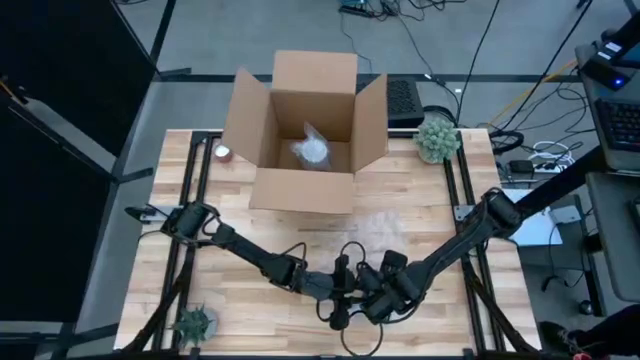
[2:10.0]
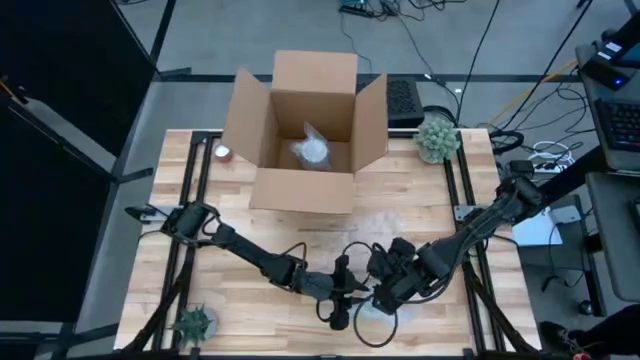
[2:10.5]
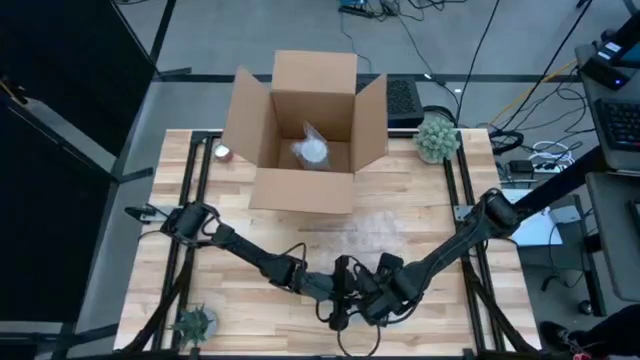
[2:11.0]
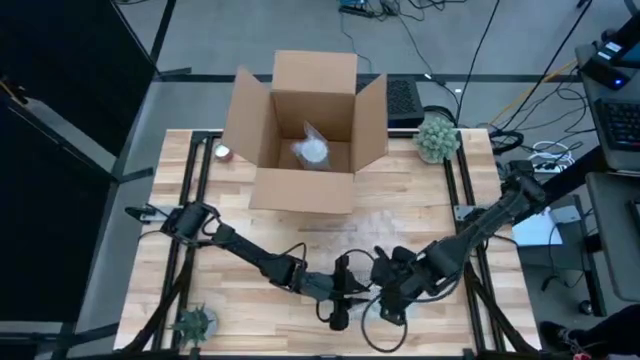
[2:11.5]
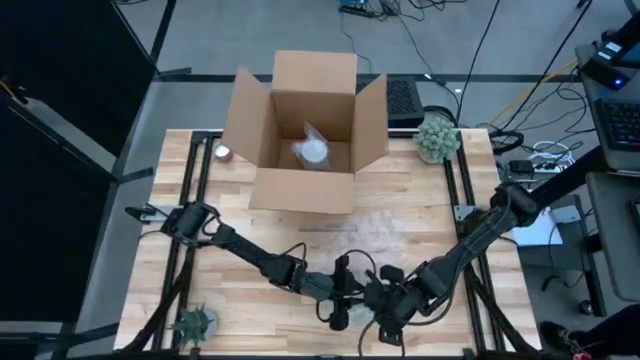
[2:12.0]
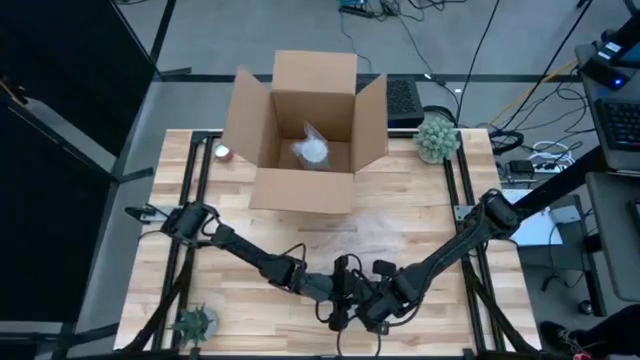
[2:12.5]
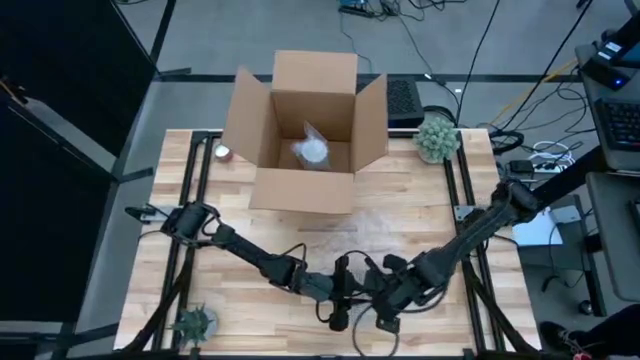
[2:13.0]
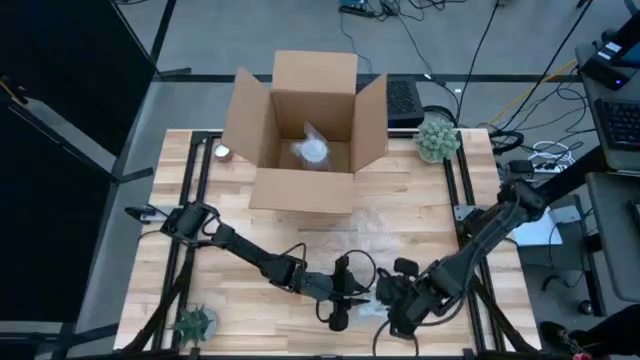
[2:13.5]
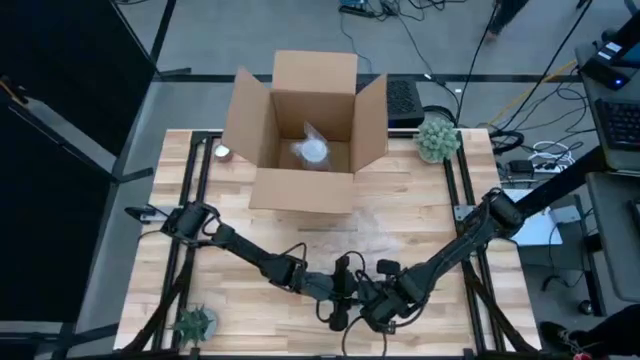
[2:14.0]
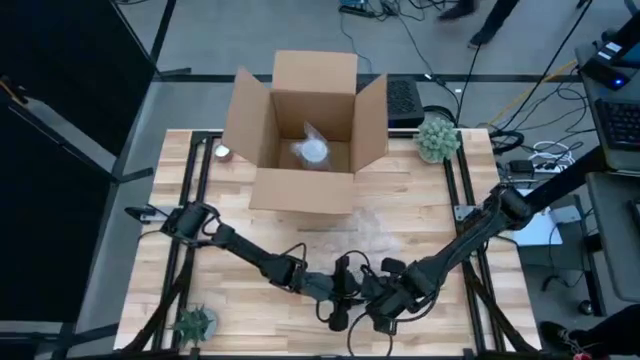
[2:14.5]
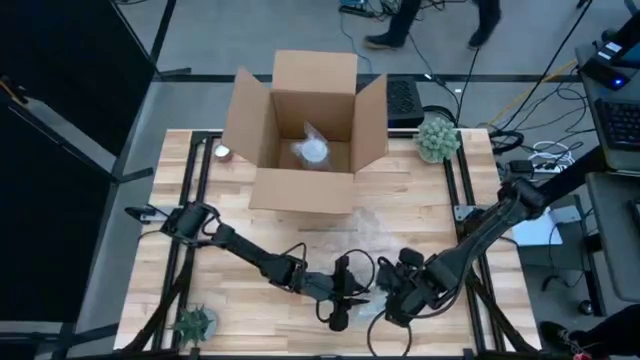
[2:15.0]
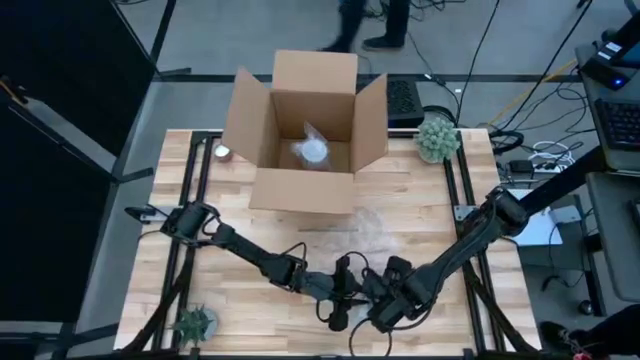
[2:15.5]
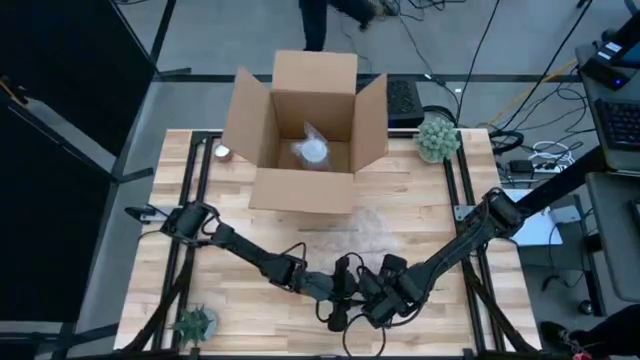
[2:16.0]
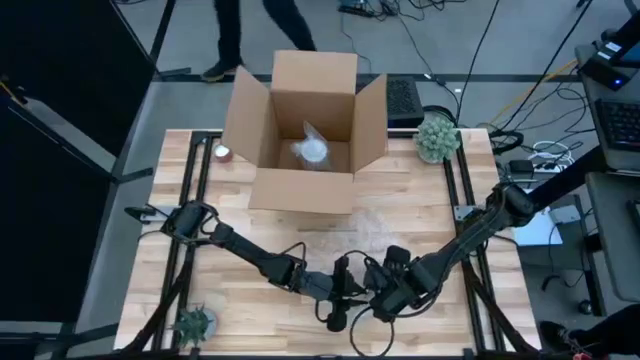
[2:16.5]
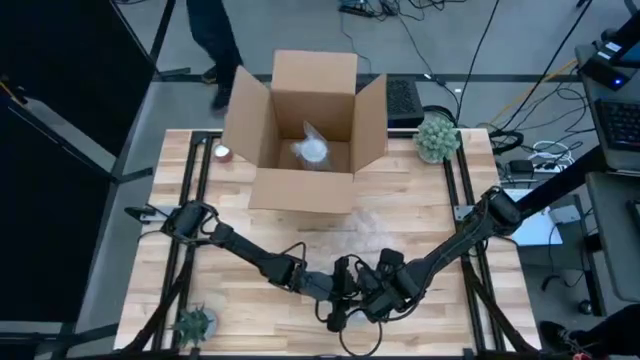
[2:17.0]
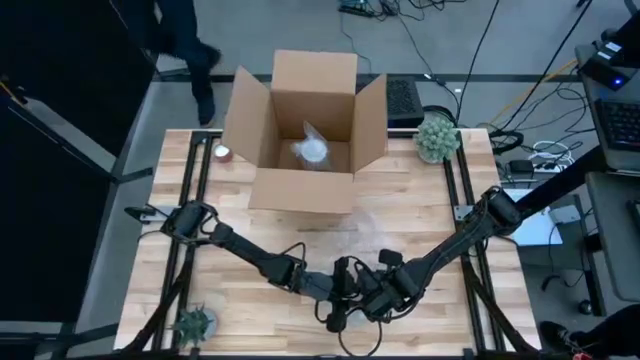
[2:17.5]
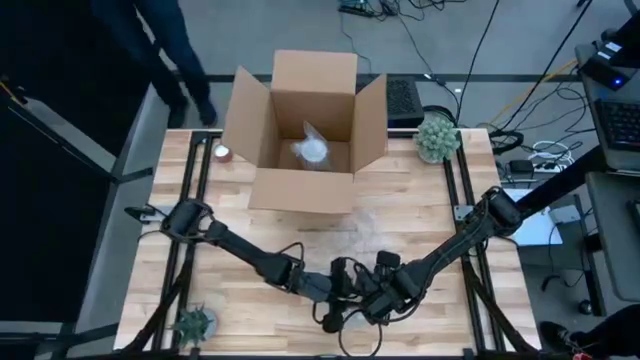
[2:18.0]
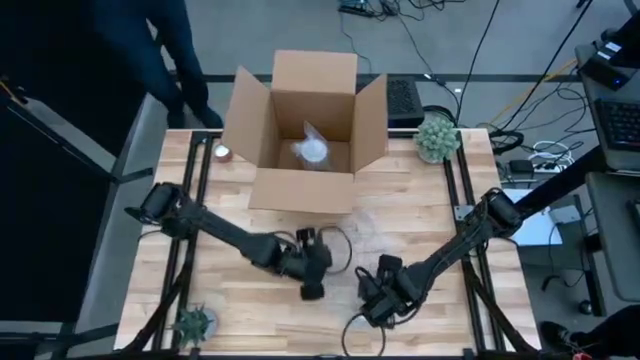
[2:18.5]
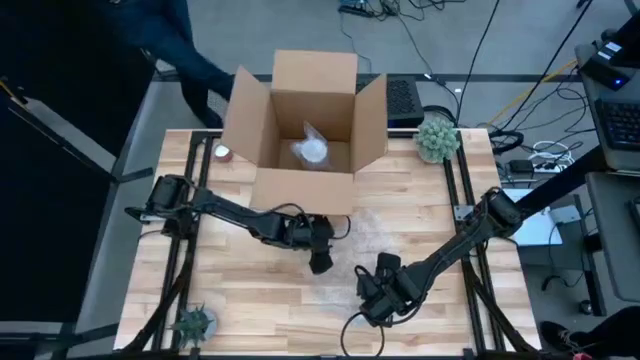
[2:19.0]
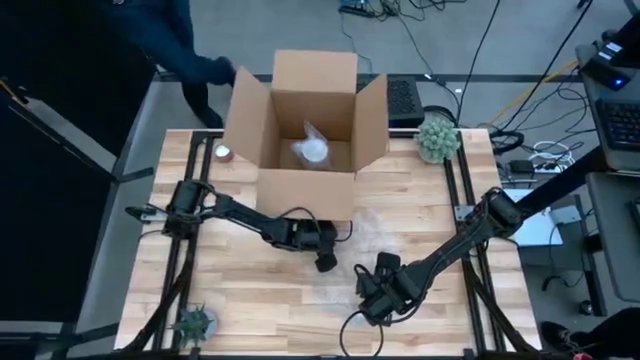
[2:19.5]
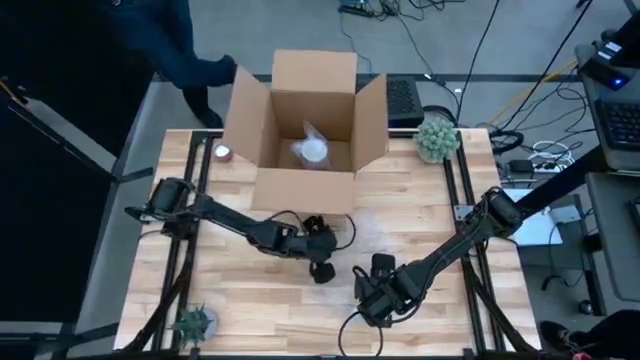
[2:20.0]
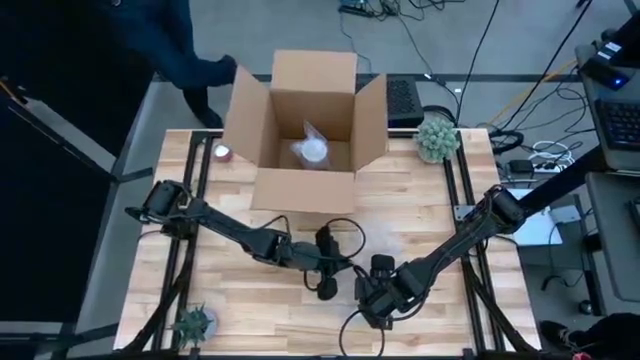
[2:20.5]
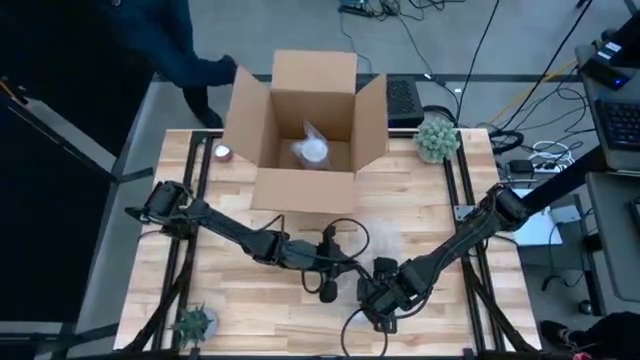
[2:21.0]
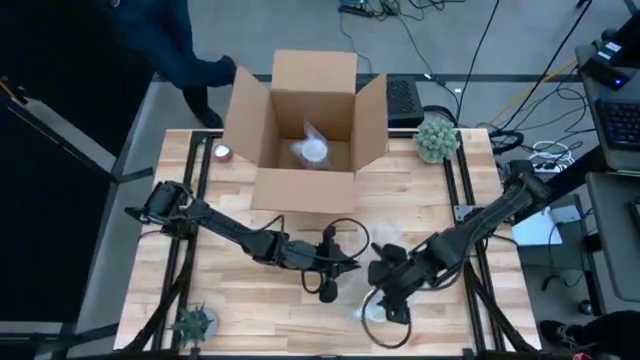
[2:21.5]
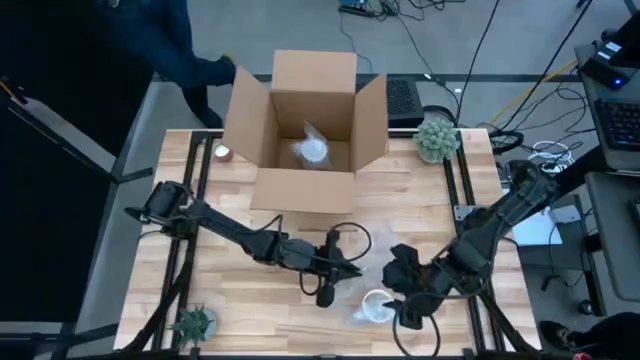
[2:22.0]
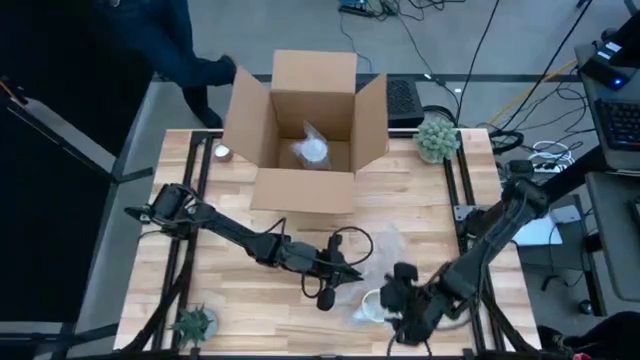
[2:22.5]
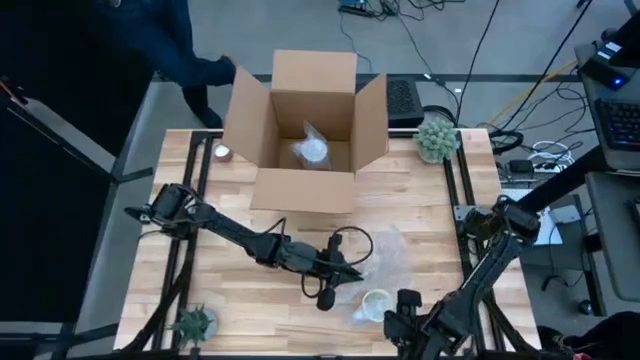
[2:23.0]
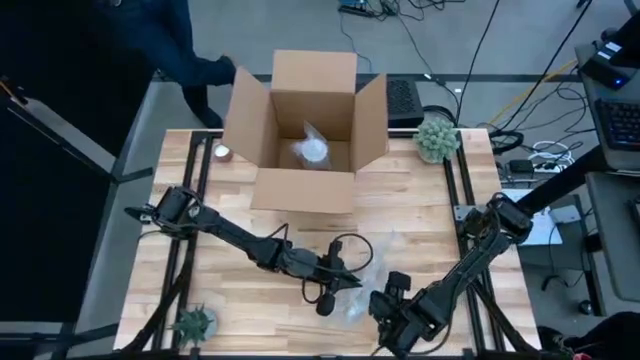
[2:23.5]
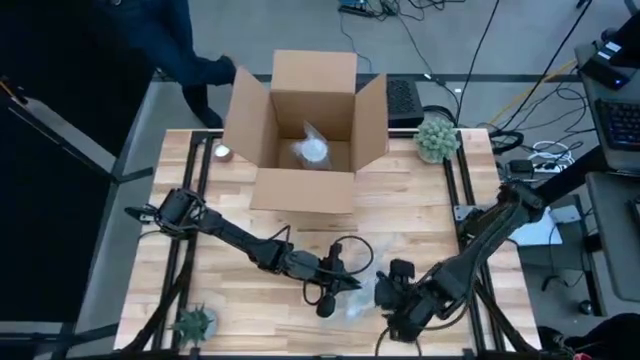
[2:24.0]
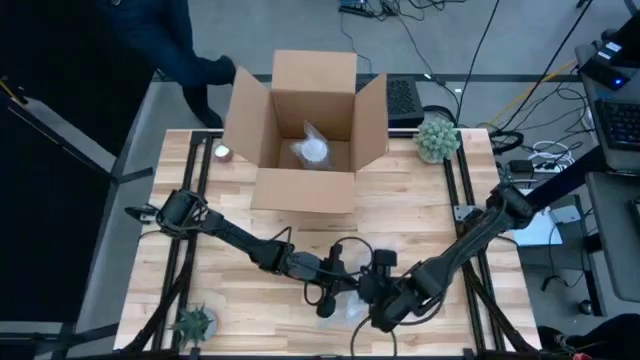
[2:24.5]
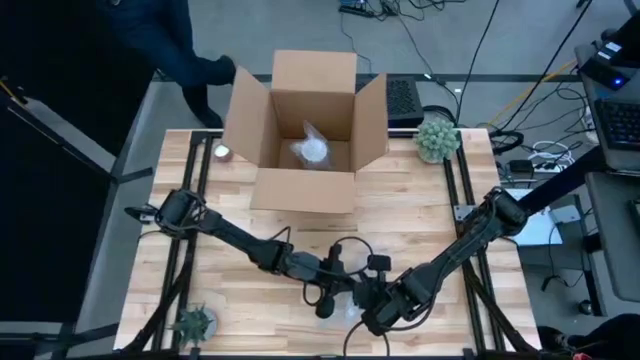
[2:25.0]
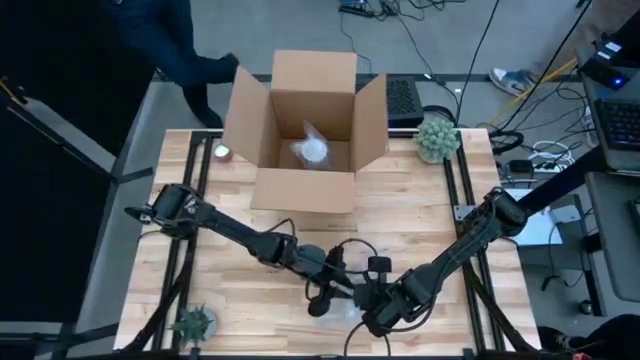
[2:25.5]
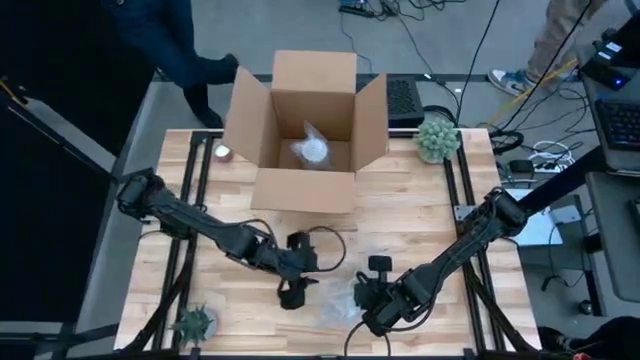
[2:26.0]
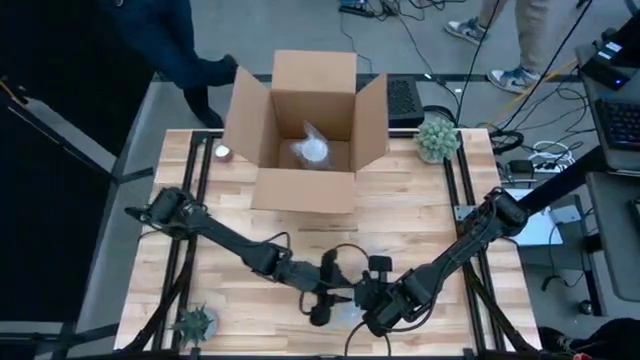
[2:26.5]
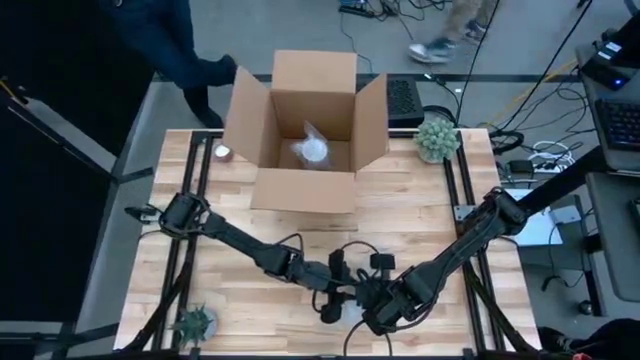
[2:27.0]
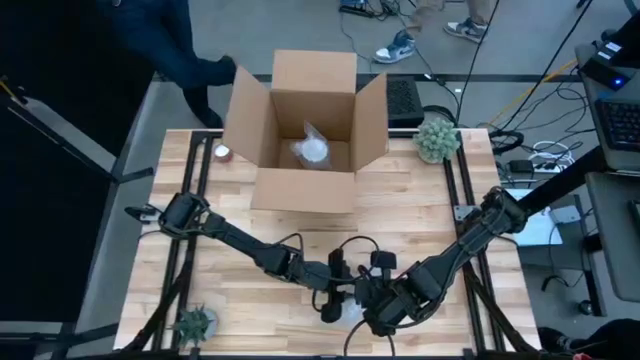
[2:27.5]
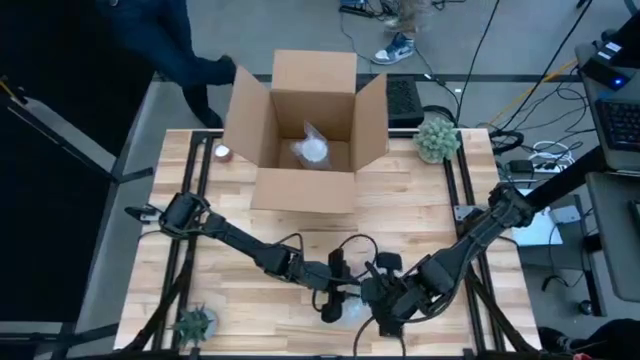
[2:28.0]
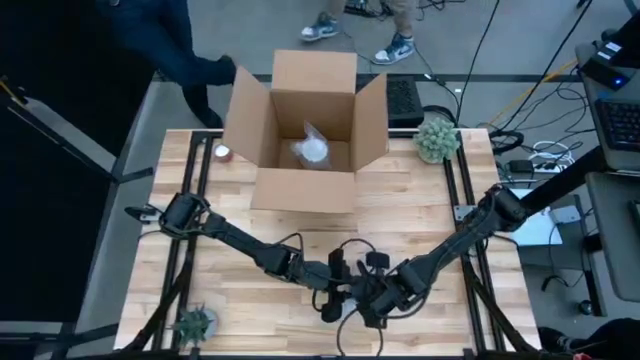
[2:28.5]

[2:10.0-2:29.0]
Task: wrap mug
Wrap the orange cup with the transparent bubble wrap

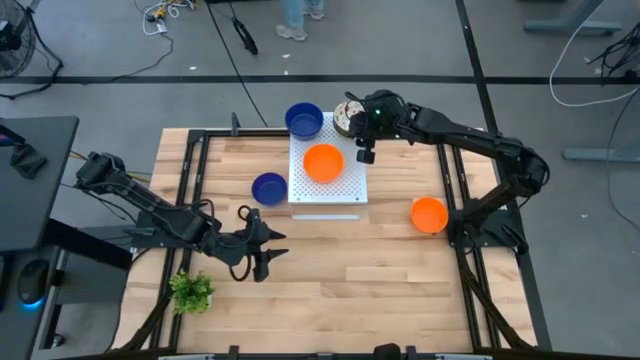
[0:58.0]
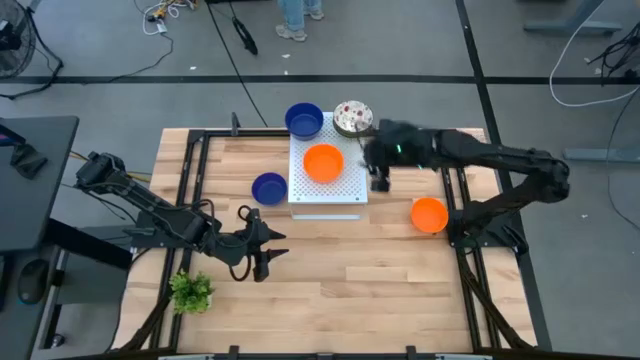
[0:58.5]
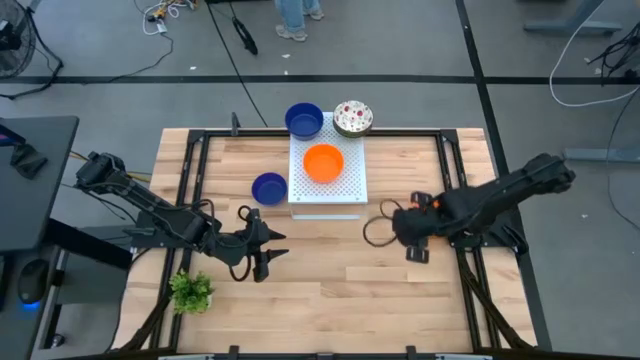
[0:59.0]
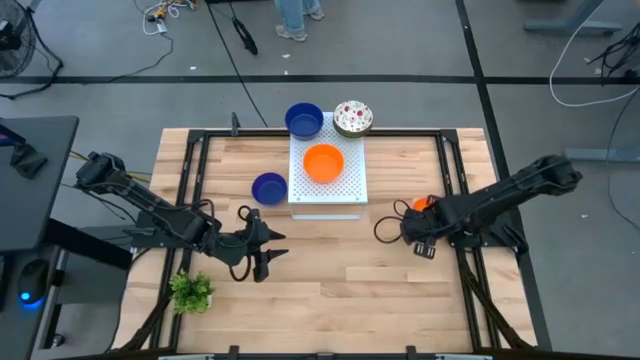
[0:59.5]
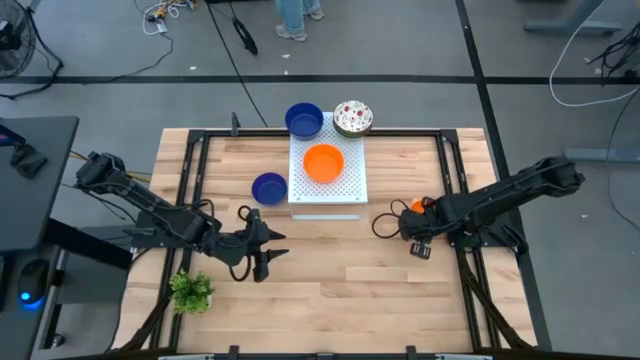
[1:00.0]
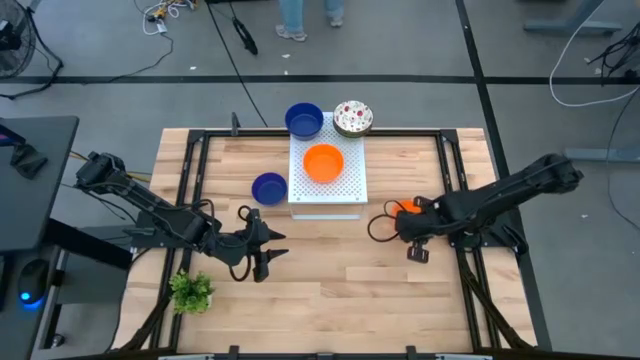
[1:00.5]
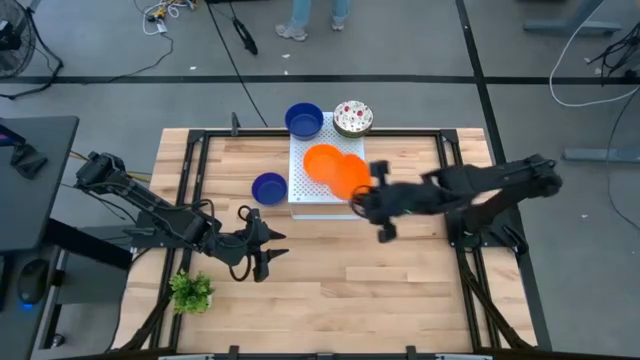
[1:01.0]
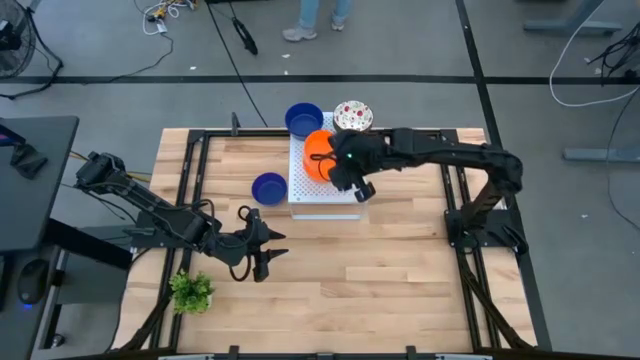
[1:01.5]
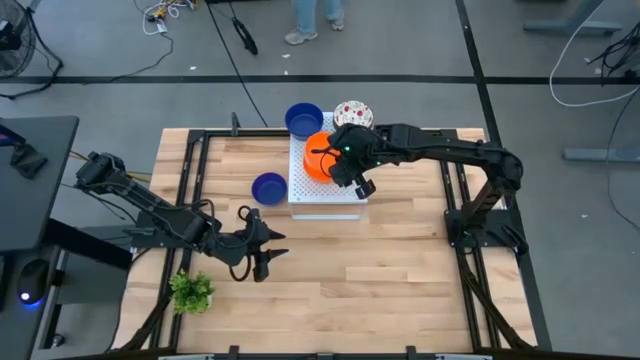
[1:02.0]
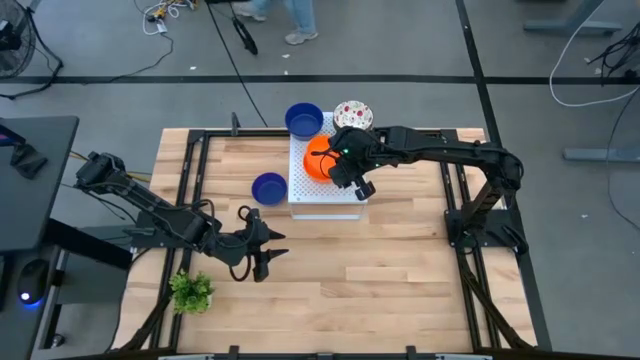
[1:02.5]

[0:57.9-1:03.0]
Task: Pick & Place Mini bowls
Stack the orange bowl on top of the other orange bowl on the shelf
